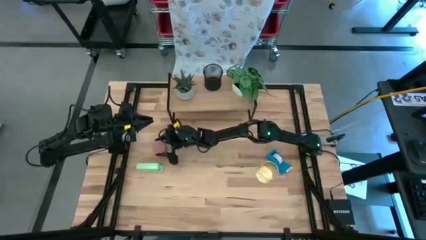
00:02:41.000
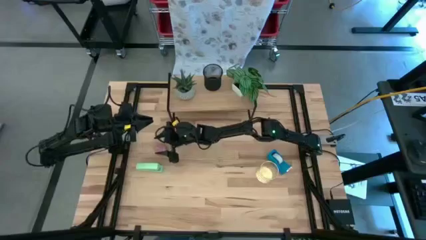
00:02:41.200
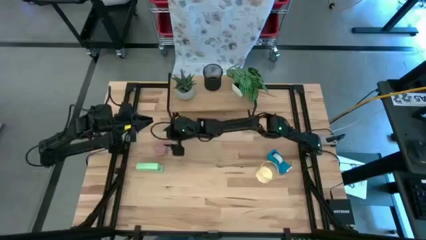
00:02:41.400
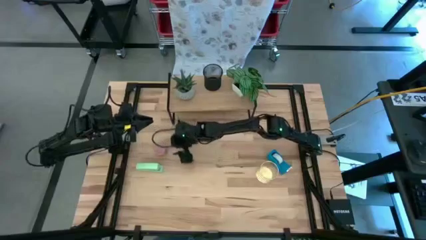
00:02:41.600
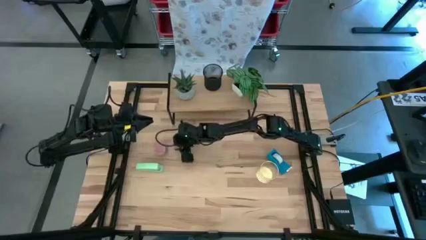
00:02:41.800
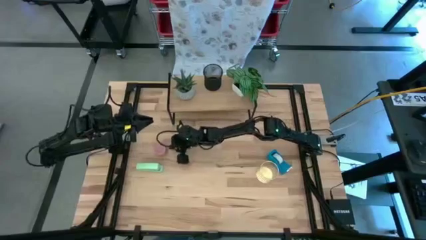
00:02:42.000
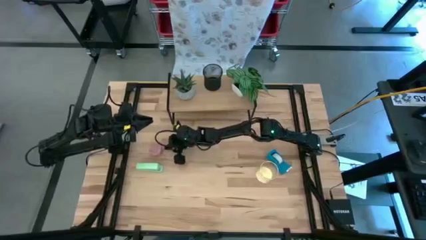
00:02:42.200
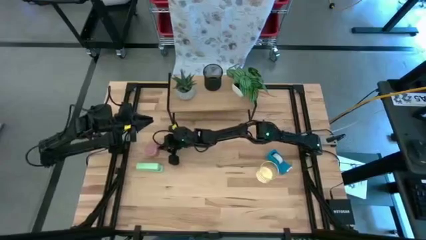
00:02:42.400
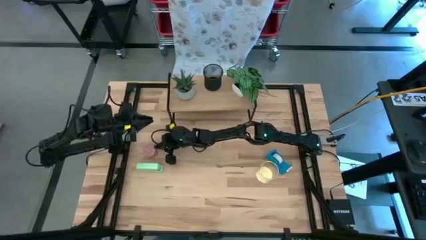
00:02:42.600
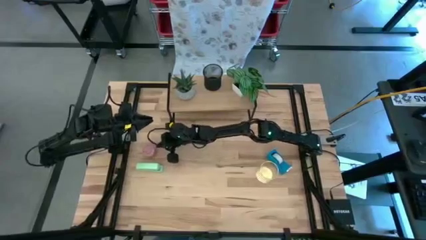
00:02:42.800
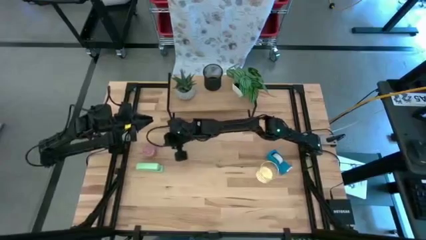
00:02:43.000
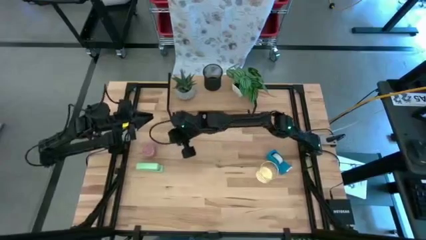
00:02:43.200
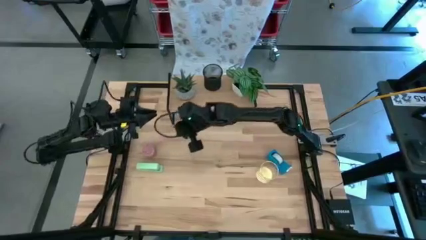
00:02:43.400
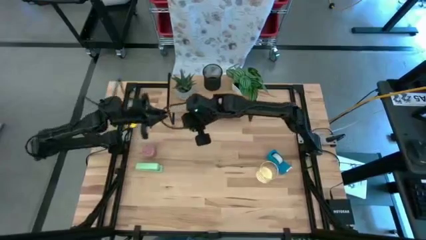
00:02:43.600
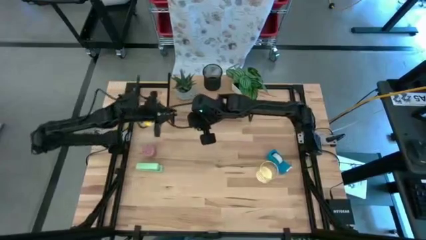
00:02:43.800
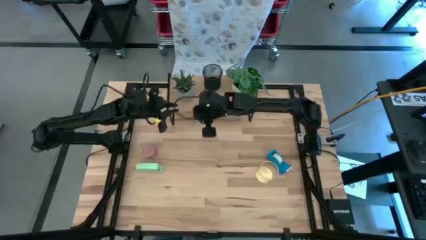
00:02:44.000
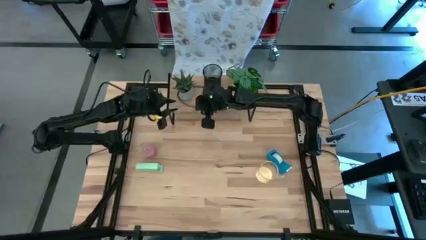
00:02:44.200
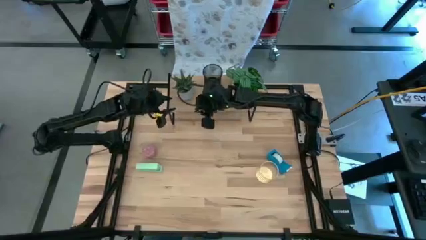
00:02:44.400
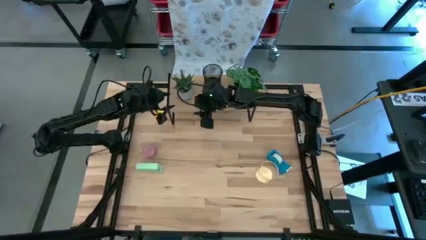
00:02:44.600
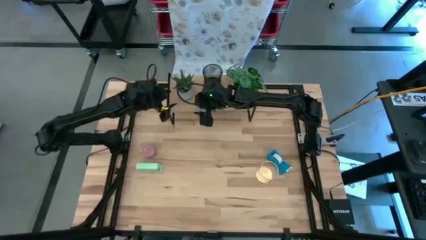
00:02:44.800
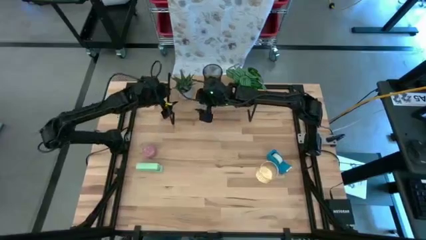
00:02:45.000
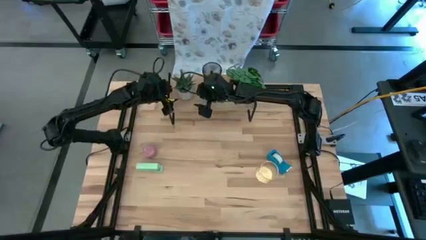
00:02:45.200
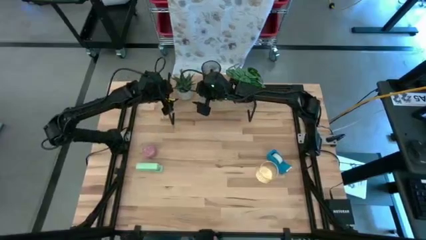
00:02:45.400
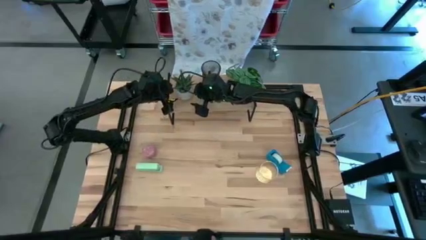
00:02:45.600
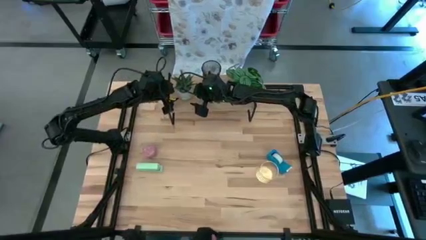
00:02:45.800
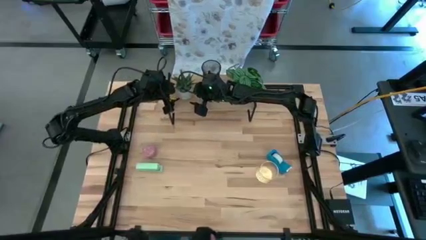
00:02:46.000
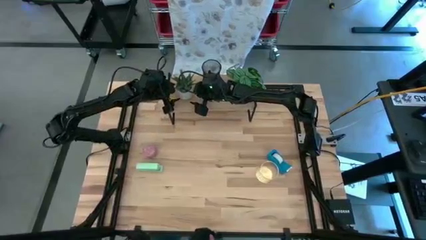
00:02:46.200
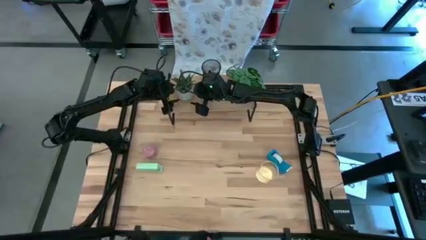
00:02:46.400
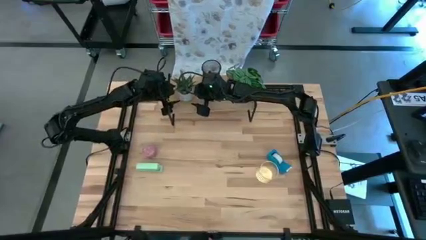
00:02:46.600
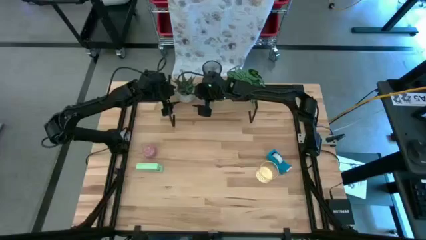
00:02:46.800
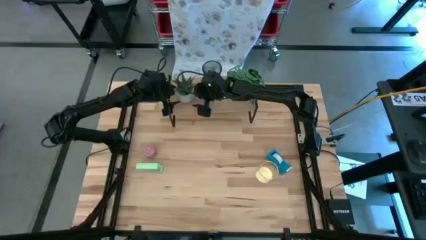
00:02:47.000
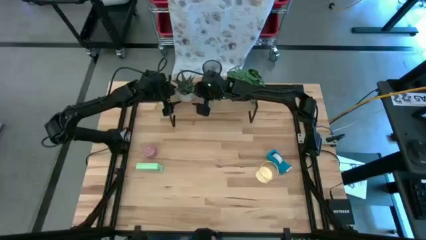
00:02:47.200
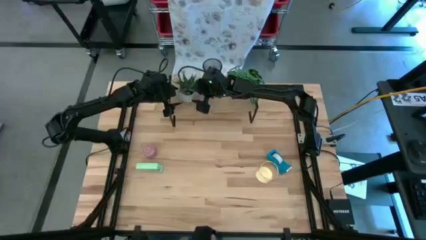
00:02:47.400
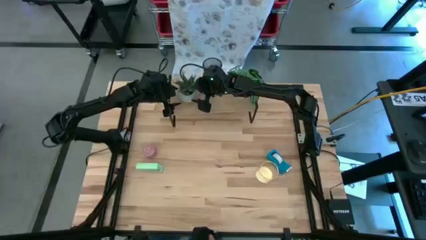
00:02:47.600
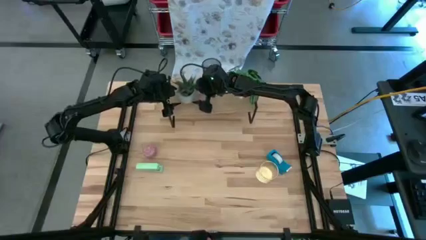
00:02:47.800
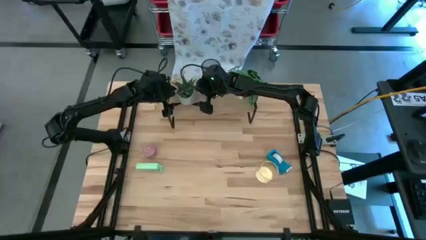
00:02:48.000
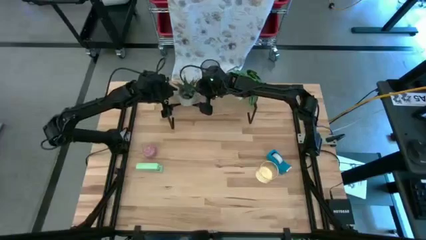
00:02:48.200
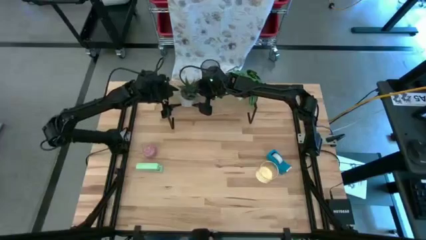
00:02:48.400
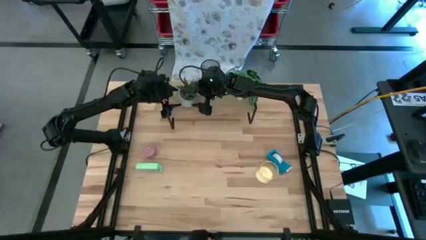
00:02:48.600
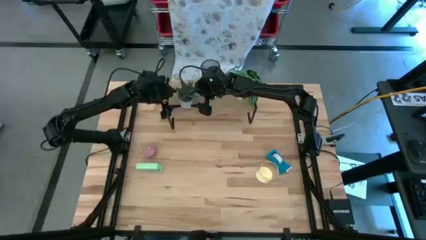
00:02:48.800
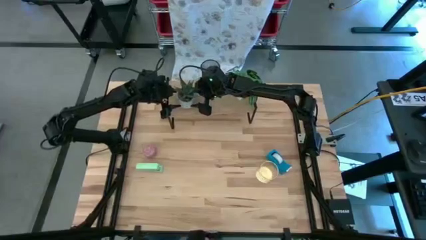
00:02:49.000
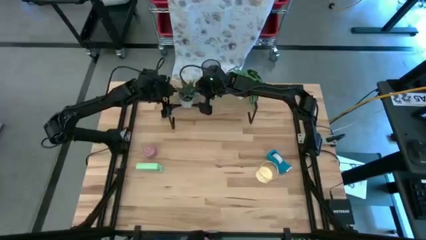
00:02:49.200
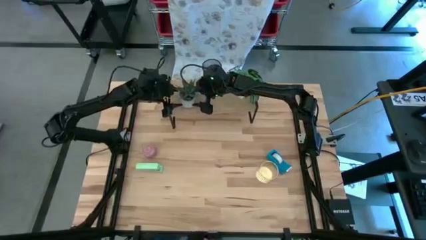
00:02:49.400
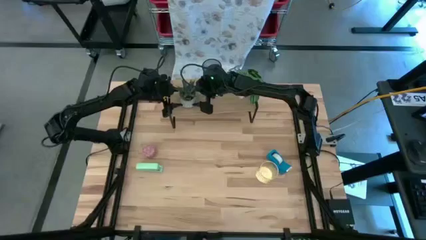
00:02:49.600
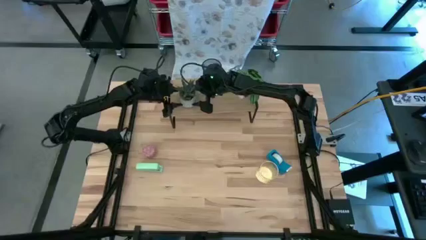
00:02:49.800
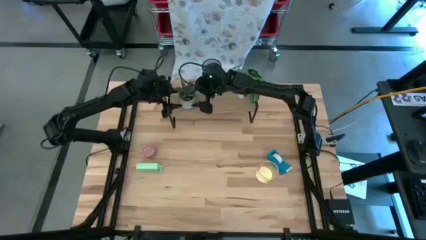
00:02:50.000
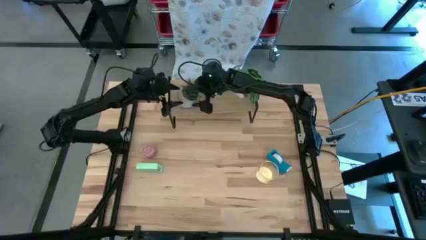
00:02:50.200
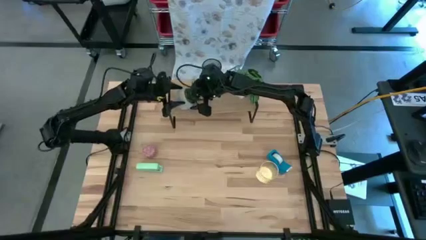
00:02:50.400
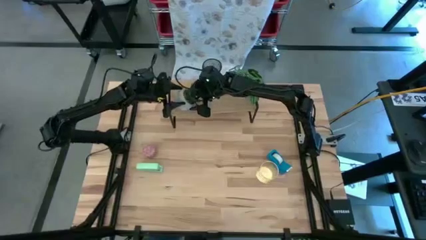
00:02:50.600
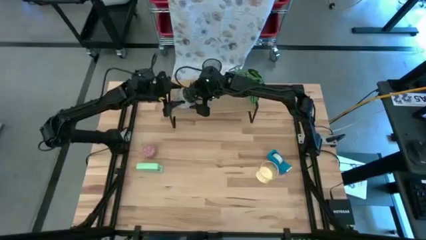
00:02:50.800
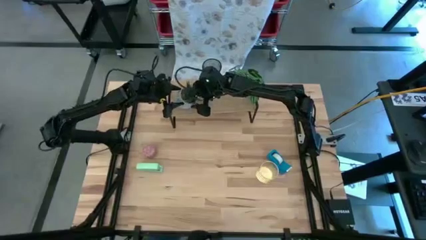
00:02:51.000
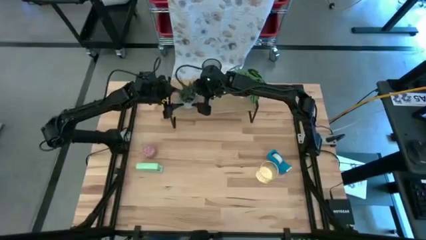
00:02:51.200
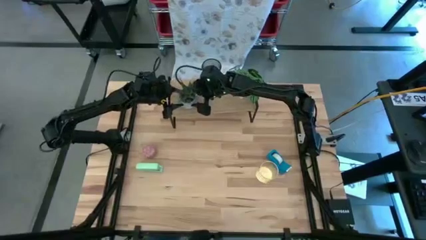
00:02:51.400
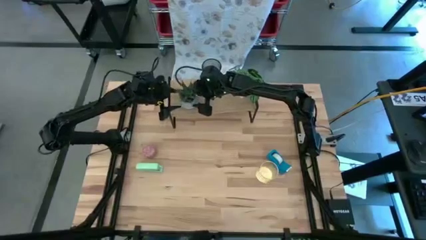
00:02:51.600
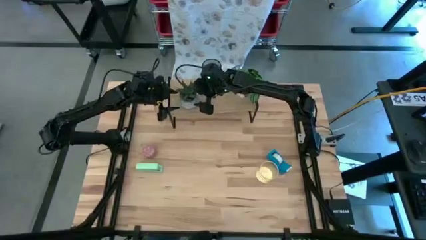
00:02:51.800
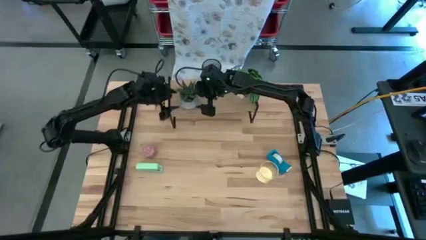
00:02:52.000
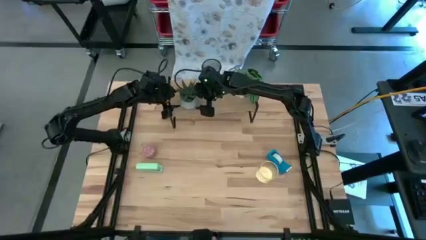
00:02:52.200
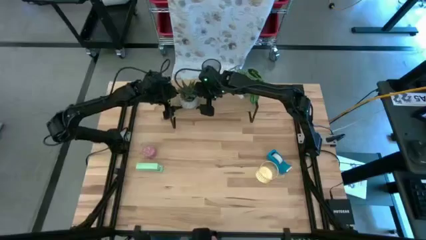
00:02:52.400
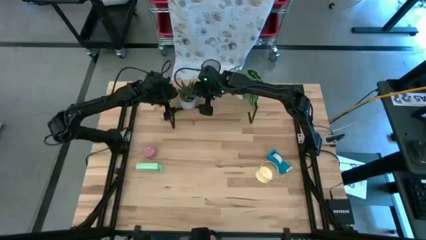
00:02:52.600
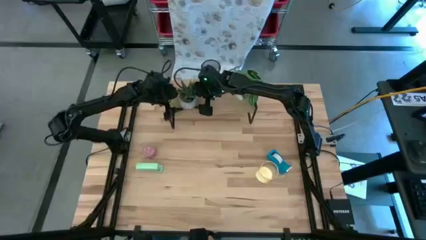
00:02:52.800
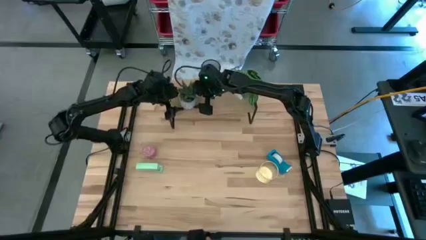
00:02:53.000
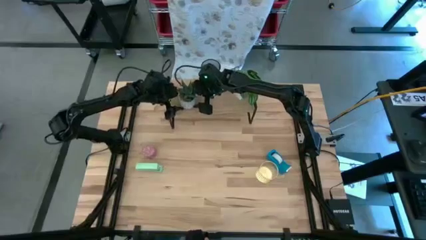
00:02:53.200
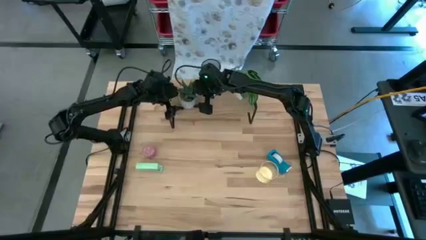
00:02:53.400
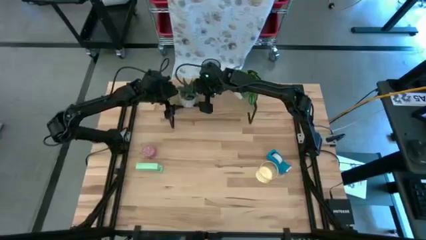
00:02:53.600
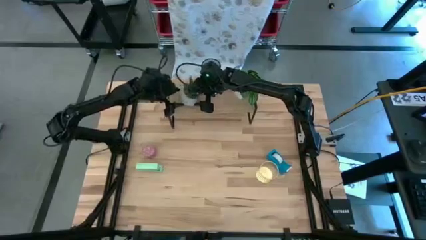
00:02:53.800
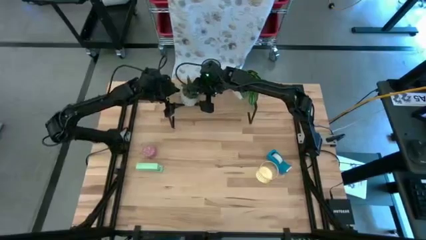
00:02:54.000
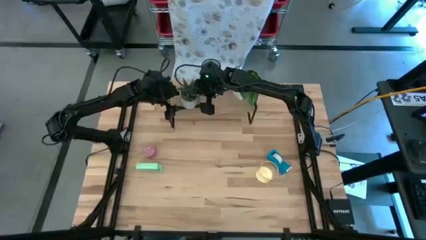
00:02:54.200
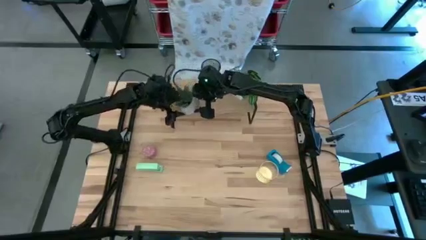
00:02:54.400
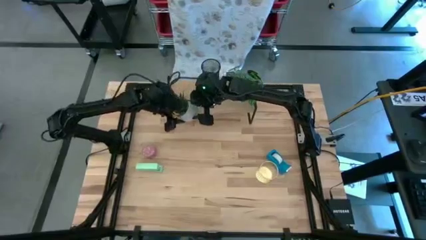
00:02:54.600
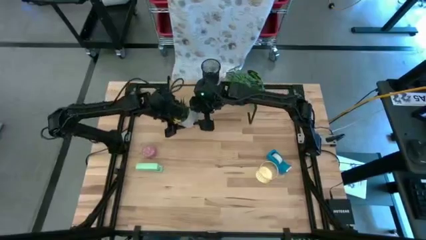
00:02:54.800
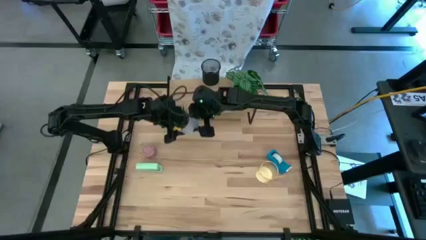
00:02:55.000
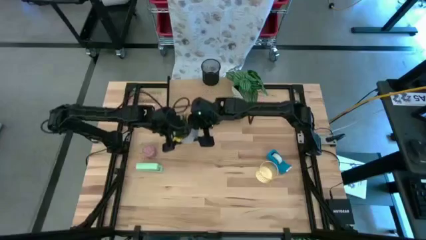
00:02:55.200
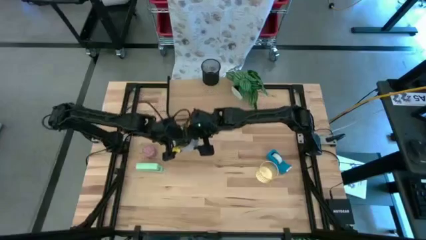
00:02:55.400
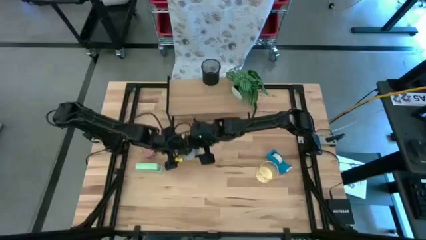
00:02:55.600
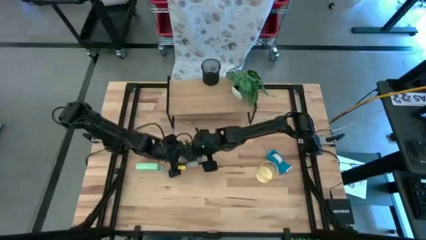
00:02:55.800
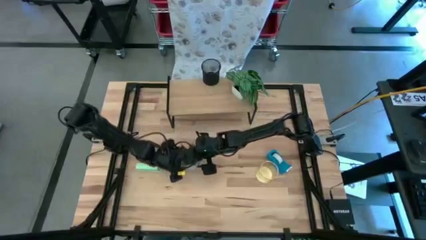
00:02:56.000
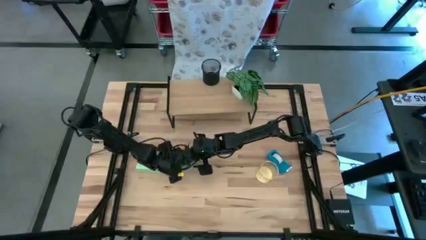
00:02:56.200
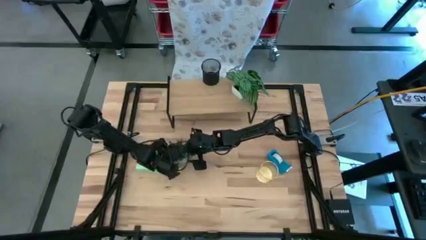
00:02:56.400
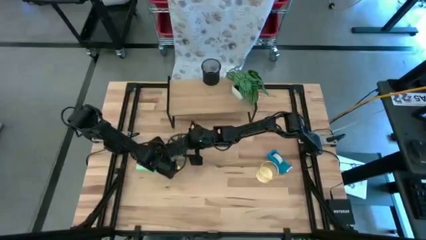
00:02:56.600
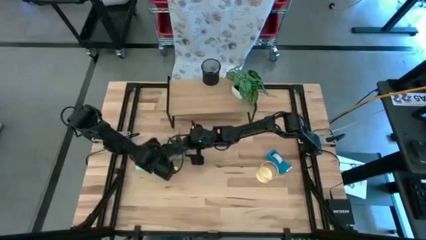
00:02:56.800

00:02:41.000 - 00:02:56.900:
Task: Stock shelves
Remove the left potted plant on the shelf
